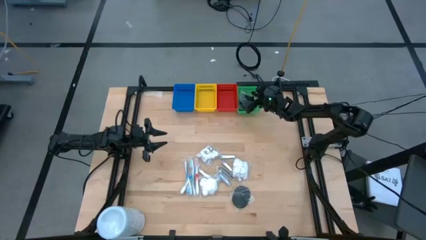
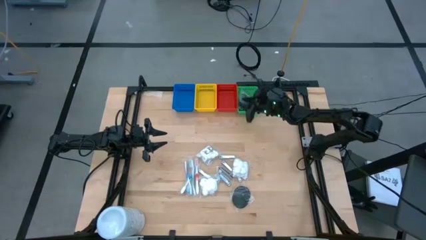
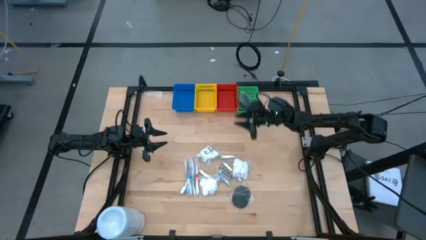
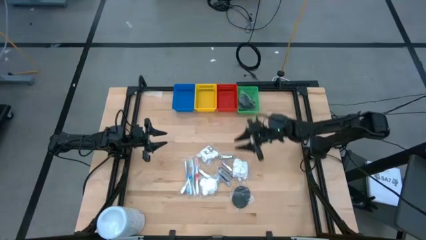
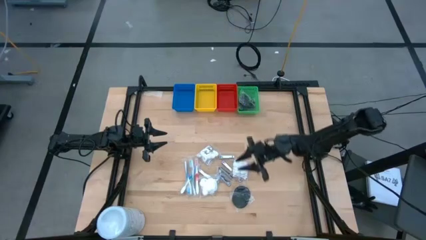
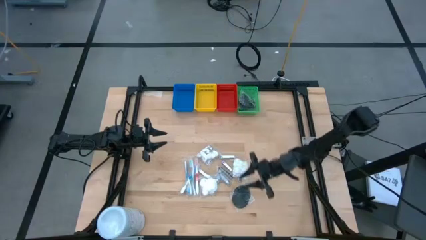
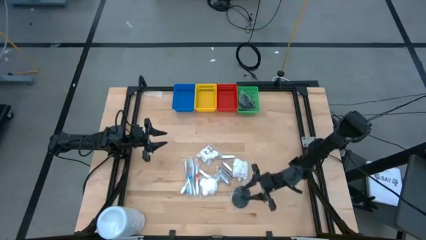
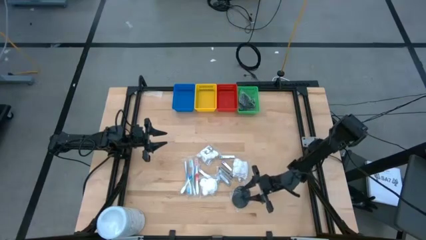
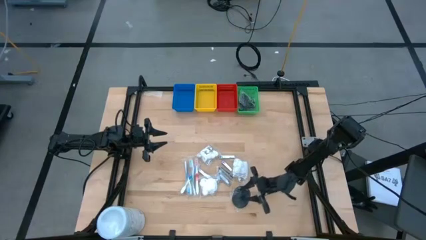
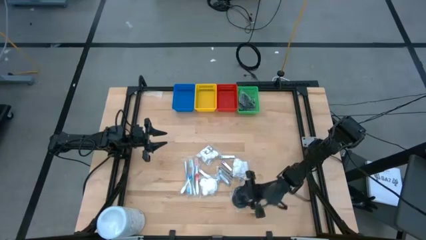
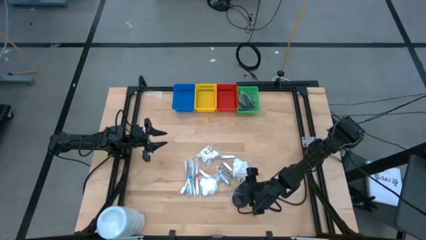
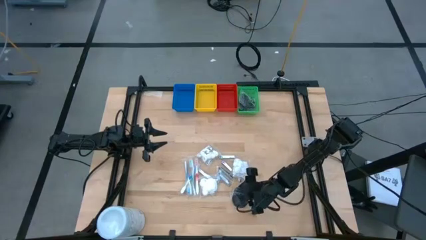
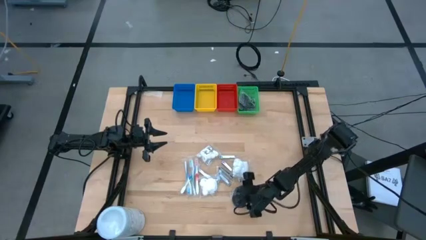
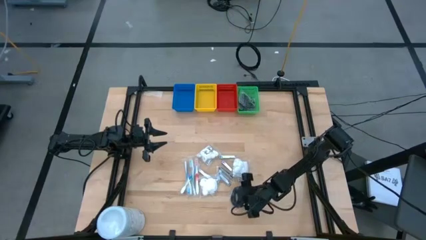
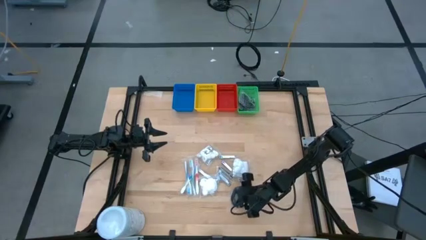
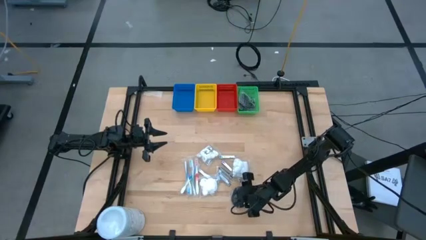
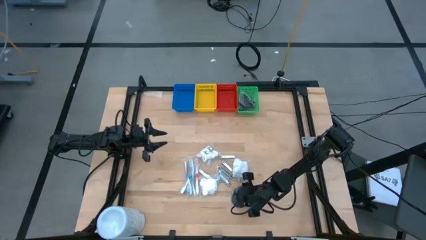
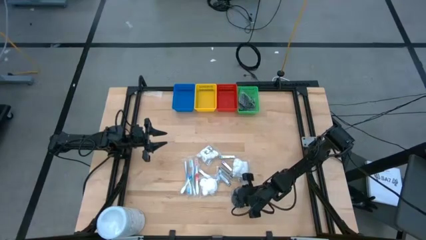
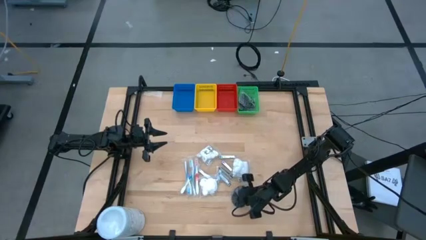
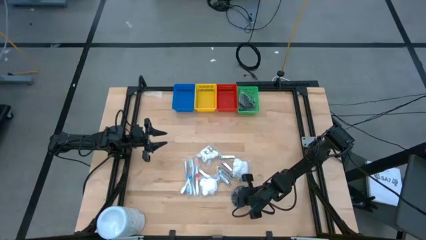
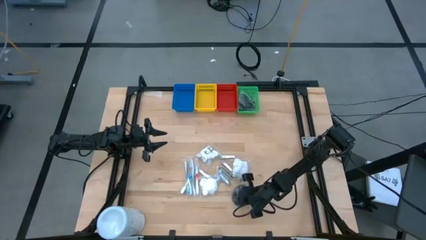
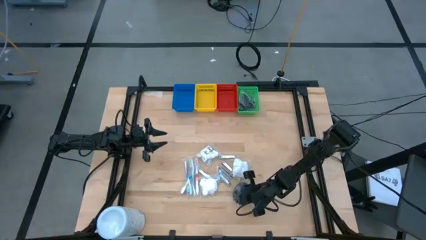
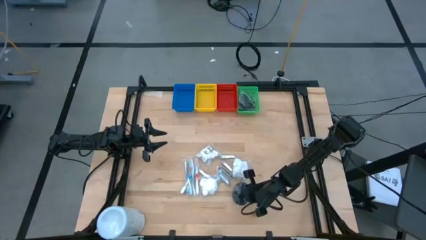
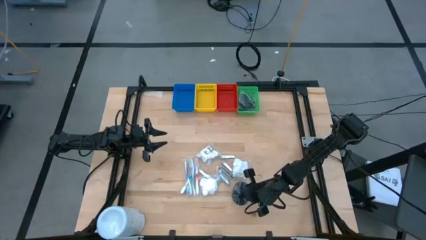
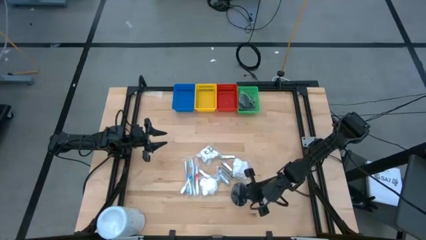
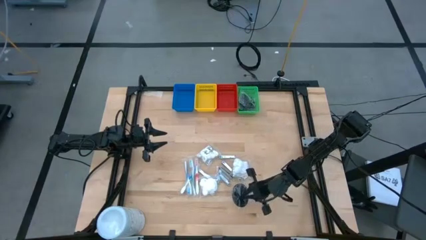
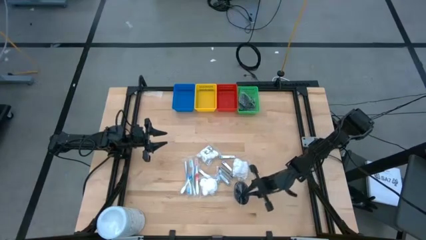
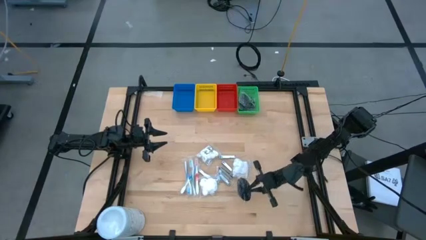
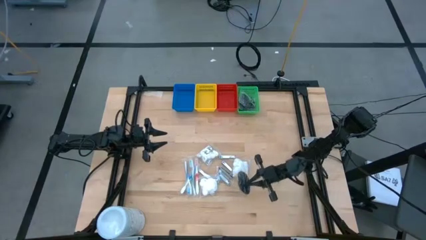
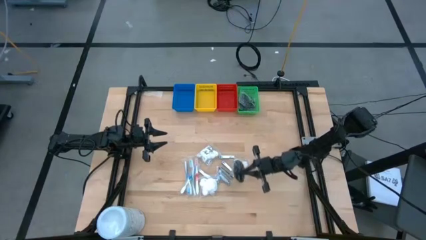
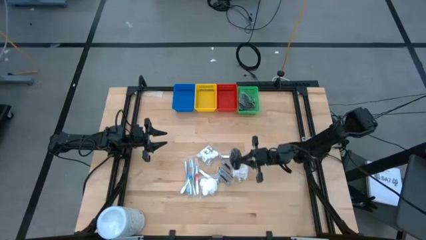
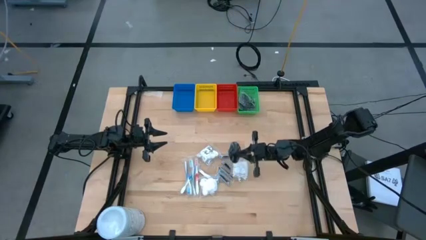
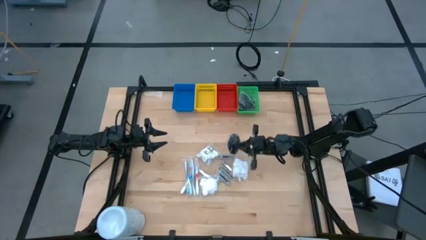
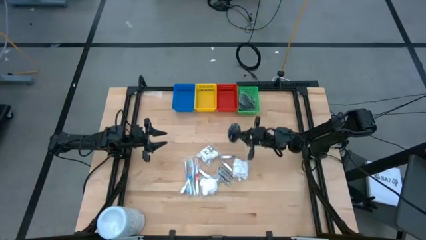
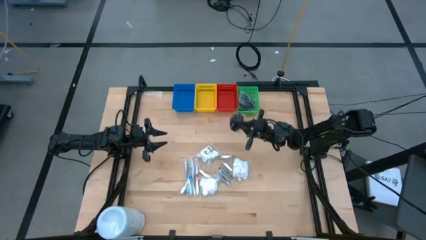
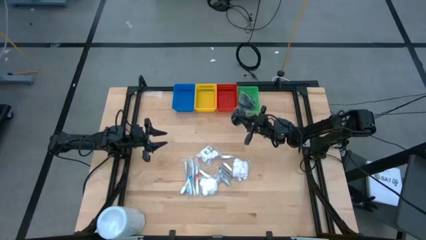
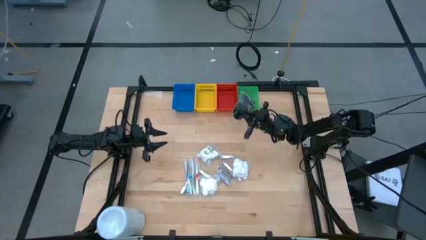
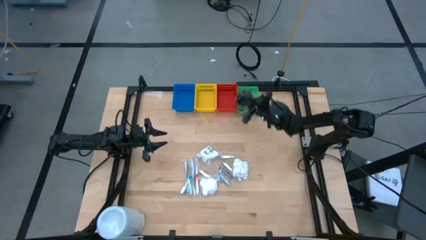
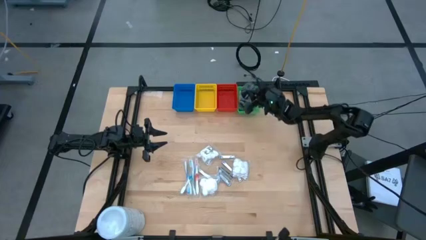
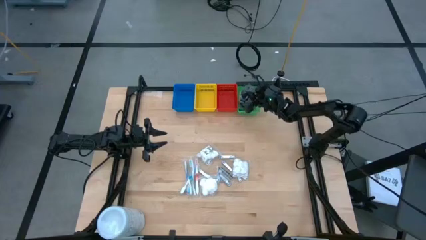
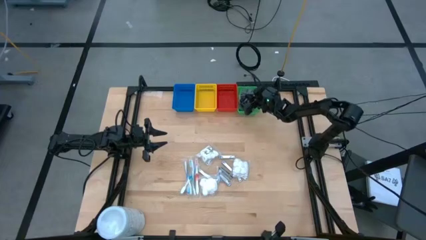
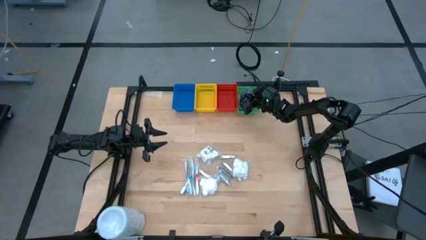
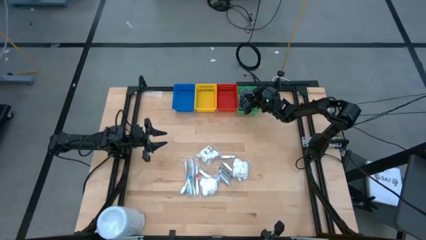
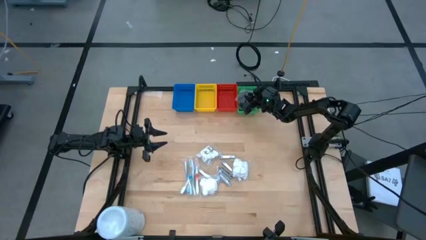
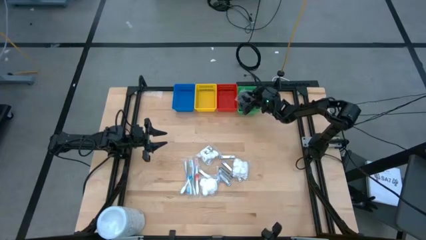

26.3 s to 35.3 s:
Task: Pick & Place Travel size toiletries
Put the hairbrush into the green bin

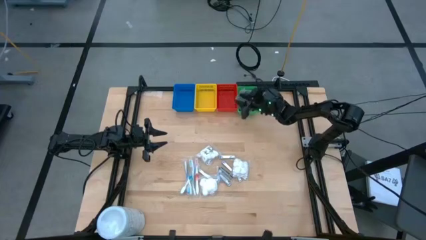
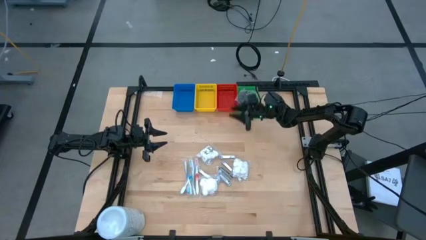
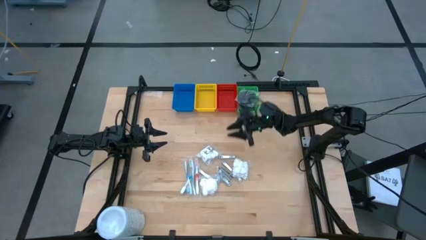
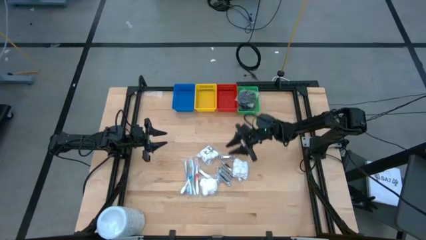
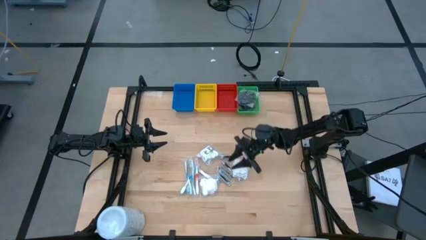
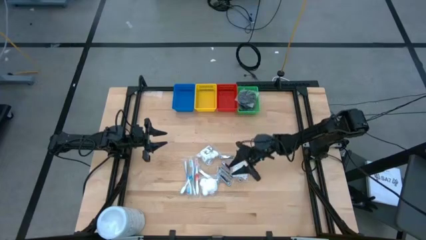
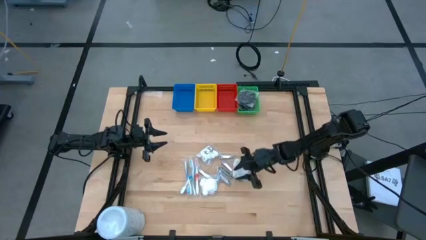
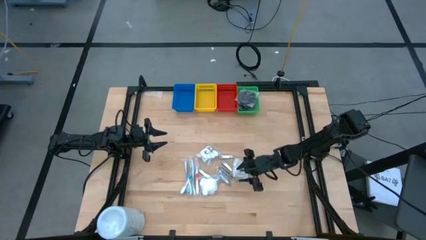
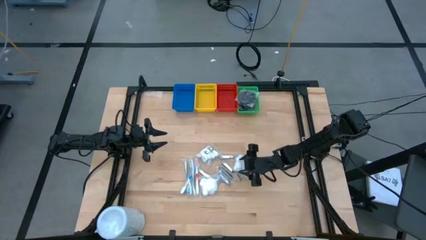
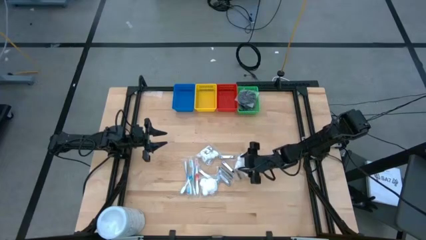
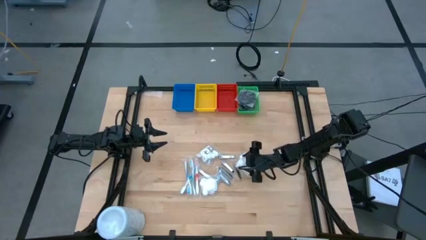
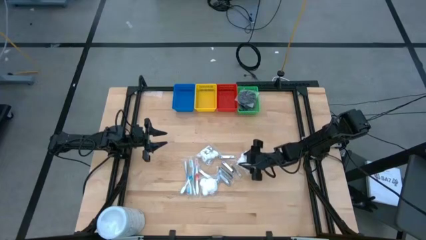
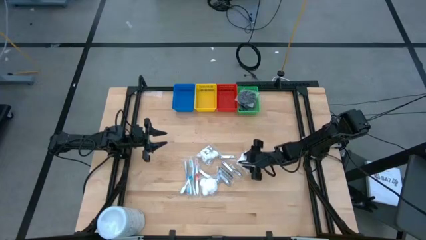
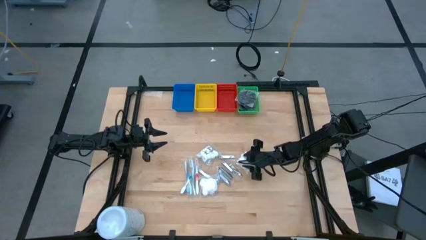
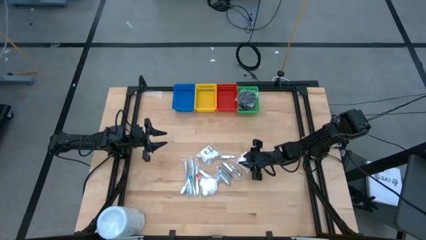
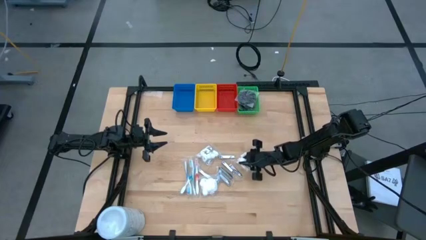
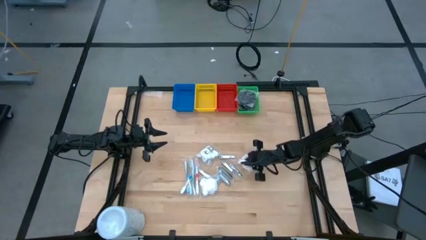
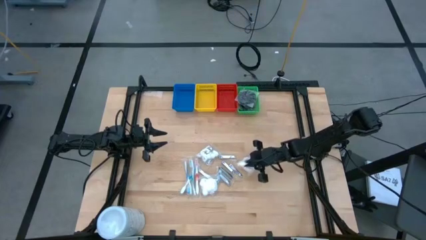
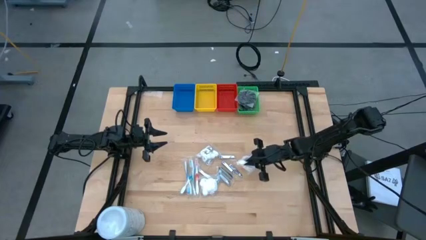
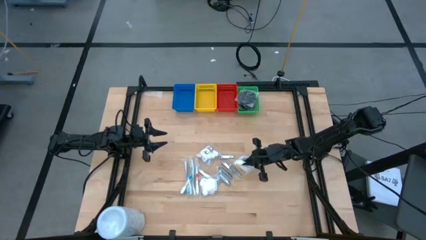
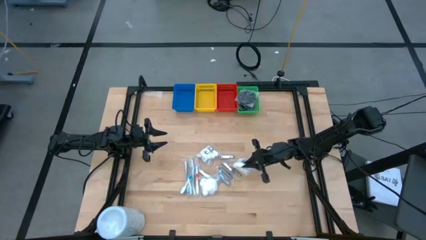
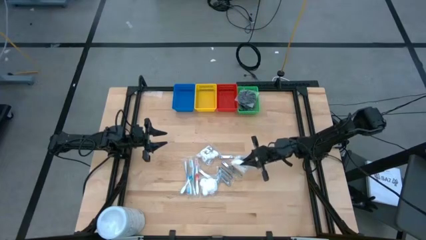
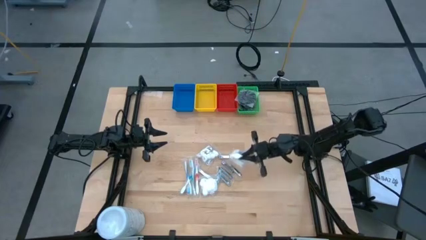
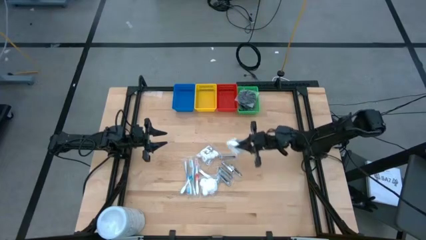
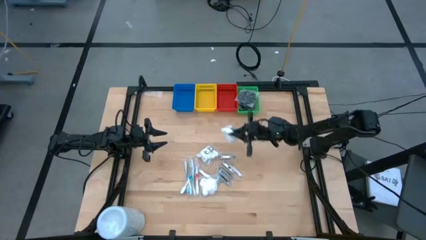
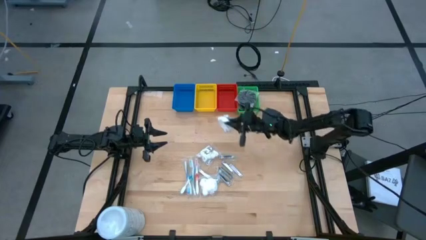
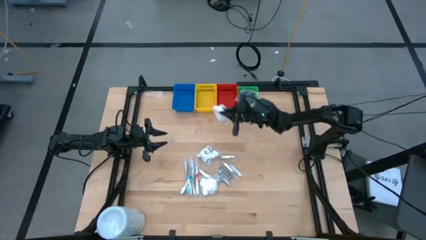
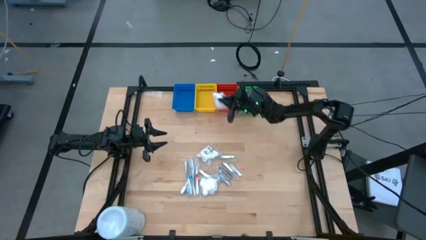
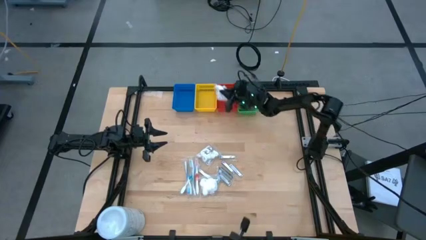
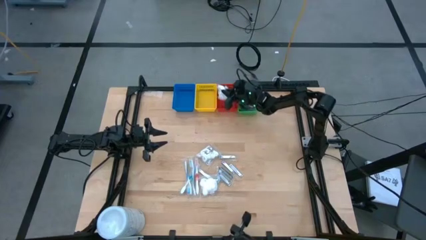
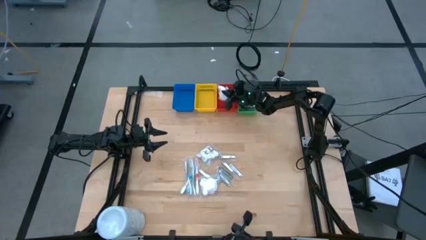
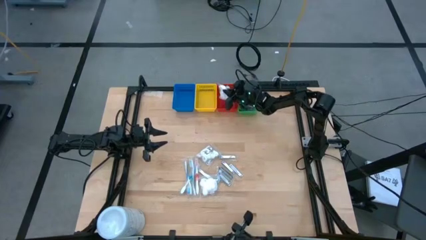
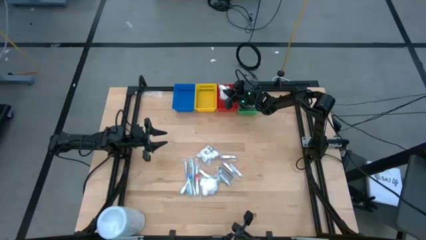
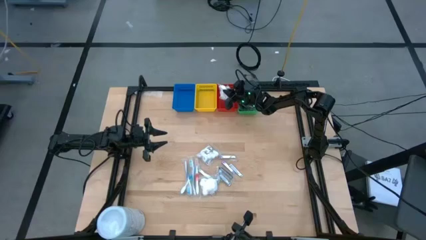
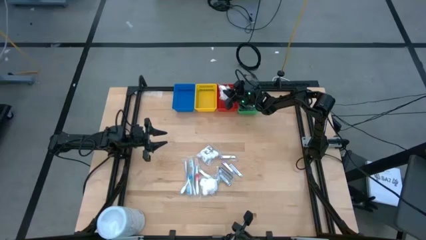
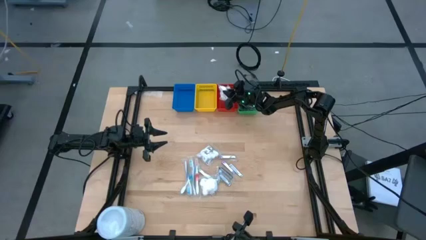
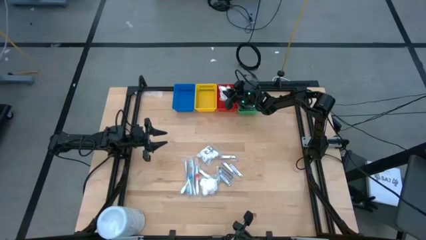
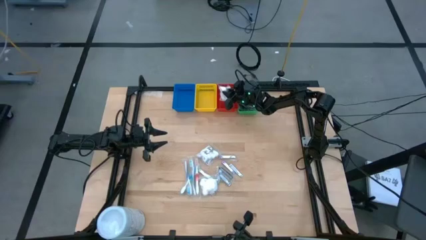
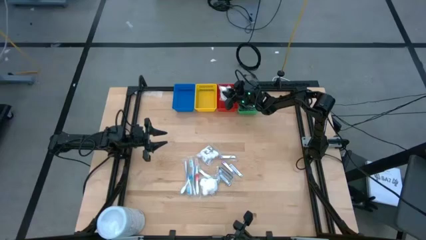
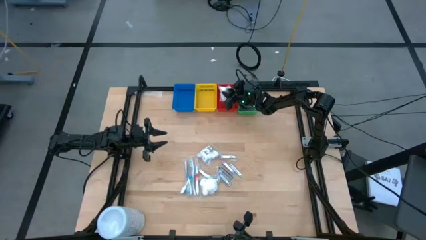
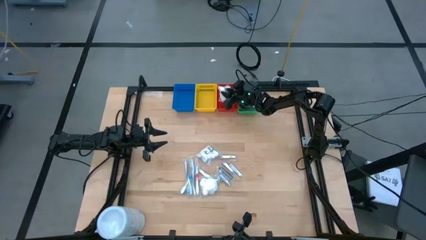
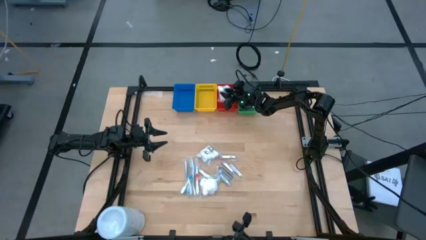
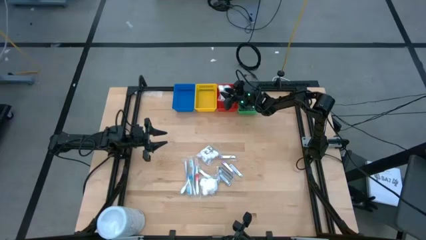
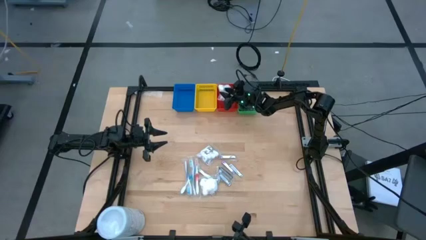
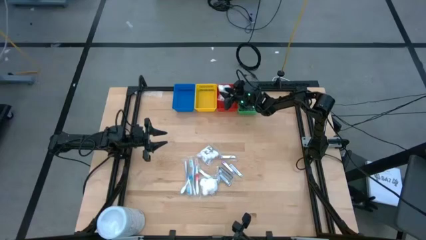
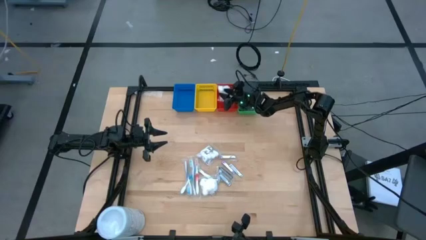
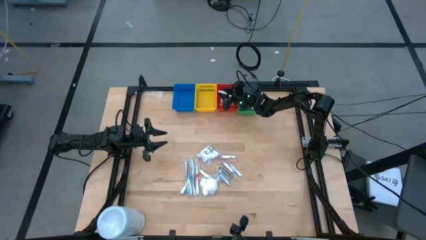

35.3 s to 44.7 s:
Put the cotton pack into the red bin
